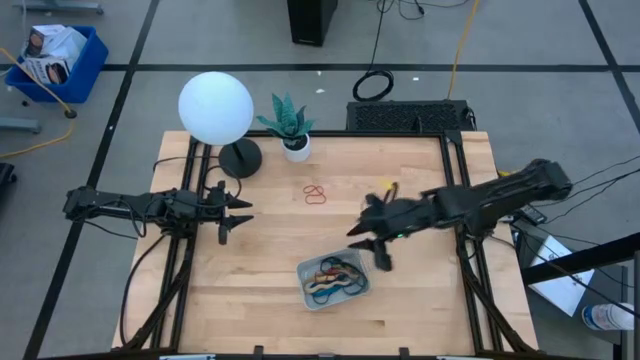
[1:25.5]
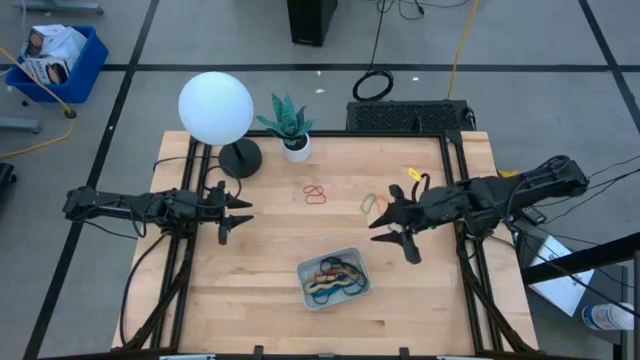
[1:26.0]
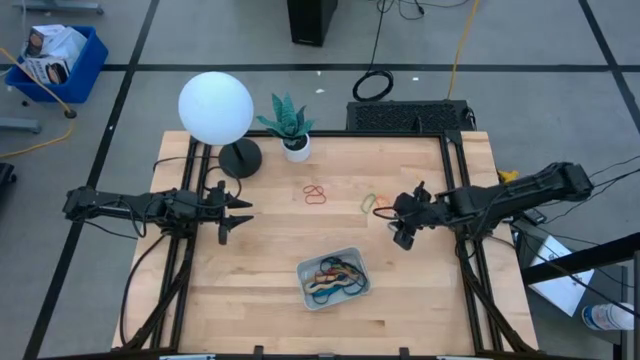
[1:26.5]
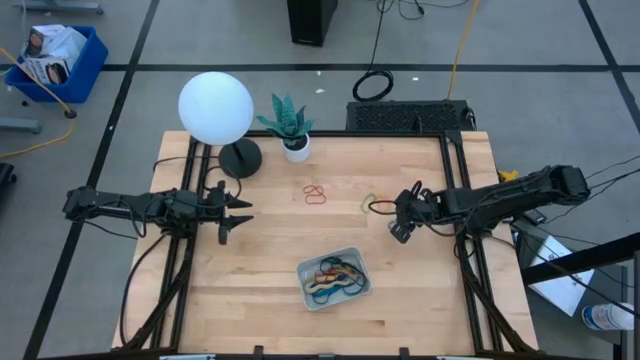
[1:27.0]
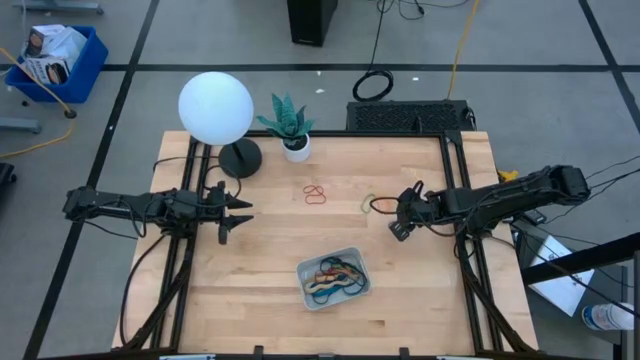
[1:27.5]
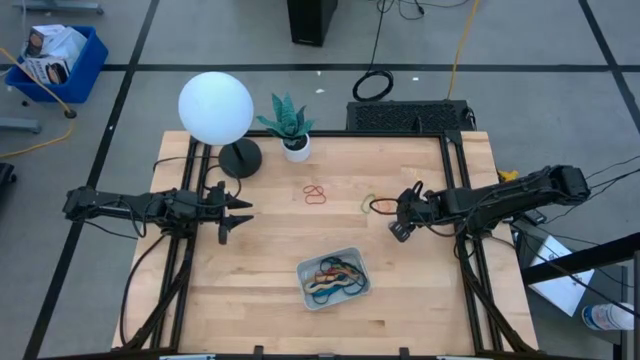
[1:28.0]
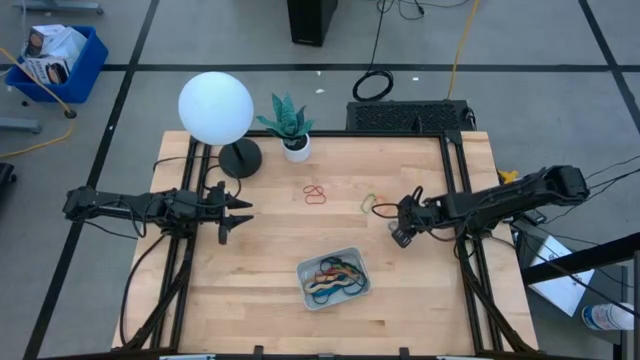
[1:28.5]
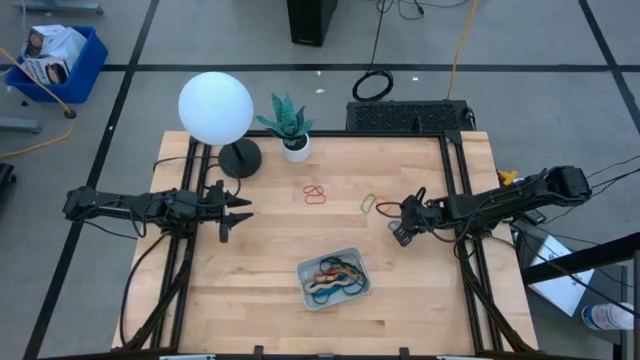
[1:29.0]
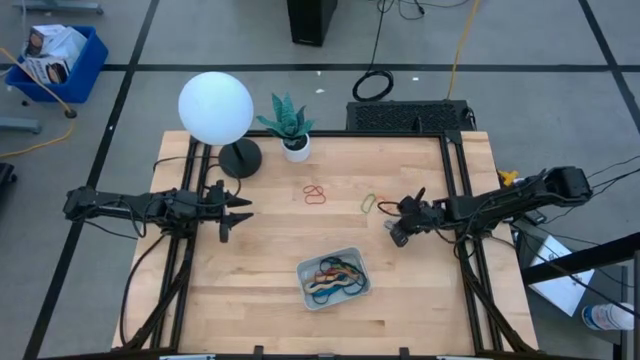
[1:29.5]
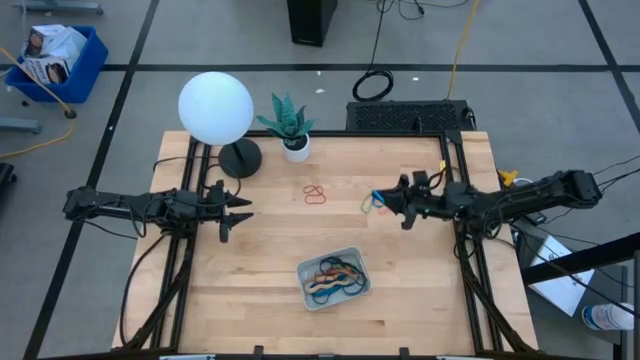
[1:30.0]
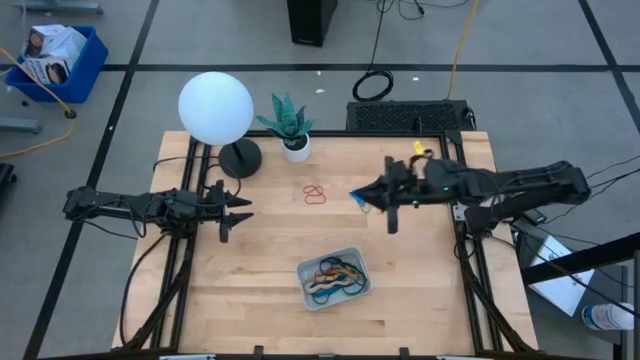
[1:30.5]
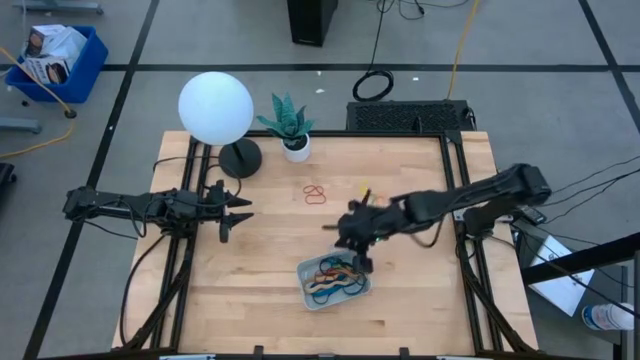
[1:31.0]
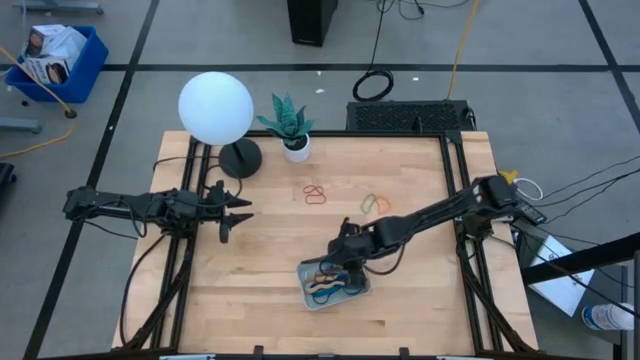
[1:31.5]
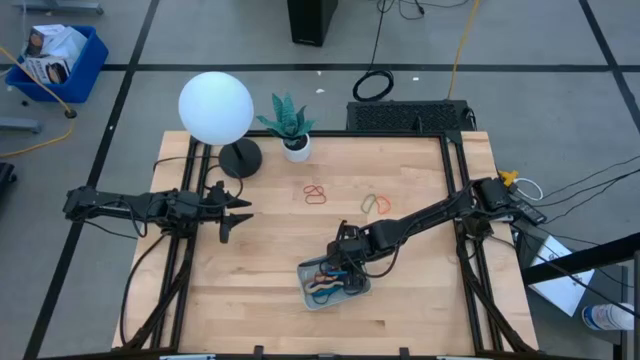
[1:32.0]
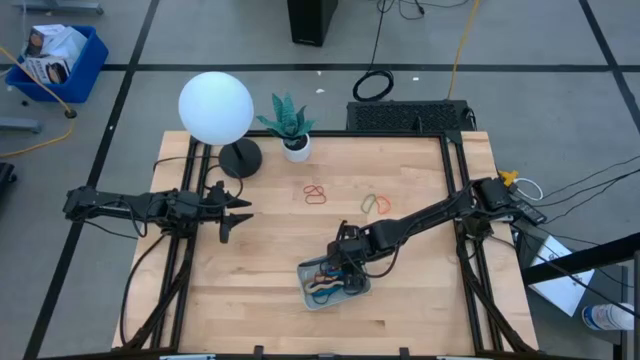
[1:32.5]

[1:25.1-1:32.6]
Task: Pick and place rubber bands into bin
Put the blue rubber band into the gray bin

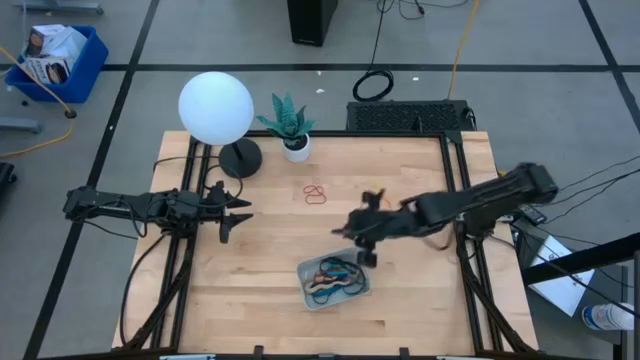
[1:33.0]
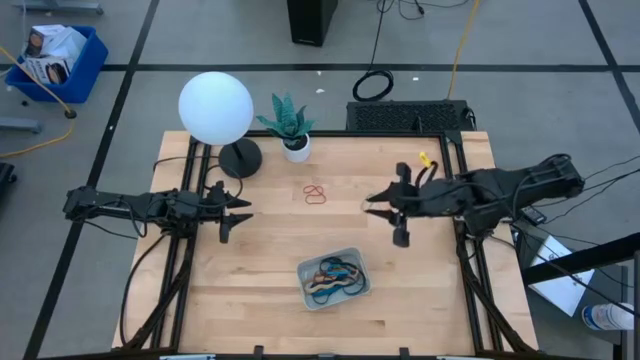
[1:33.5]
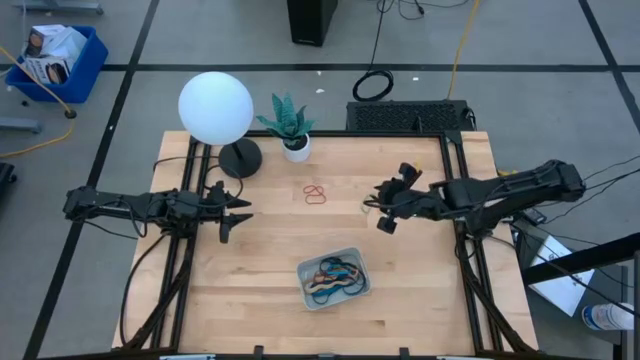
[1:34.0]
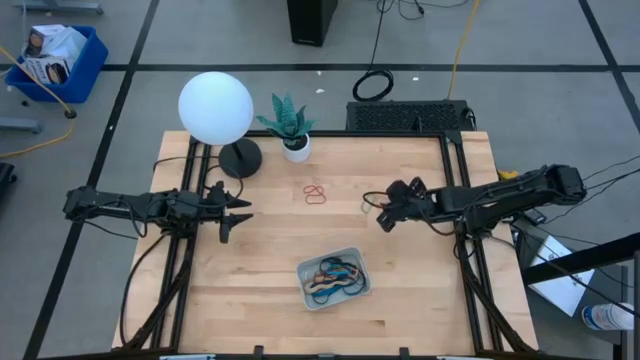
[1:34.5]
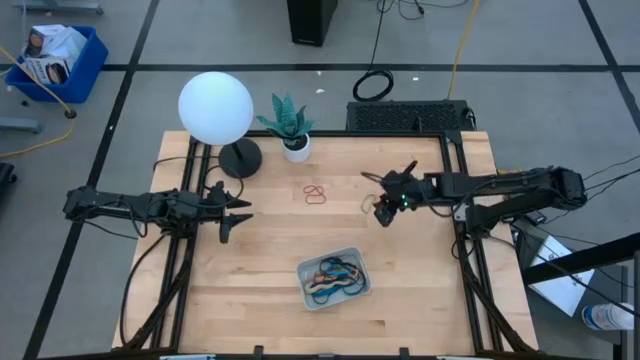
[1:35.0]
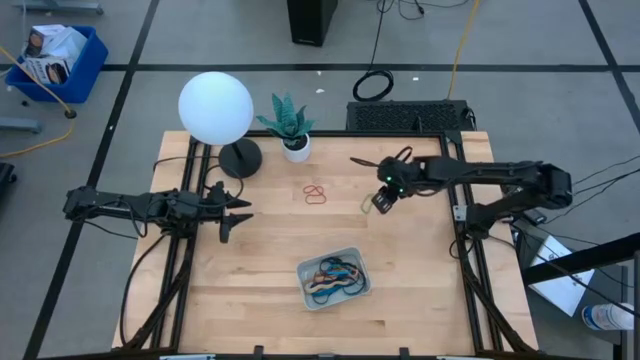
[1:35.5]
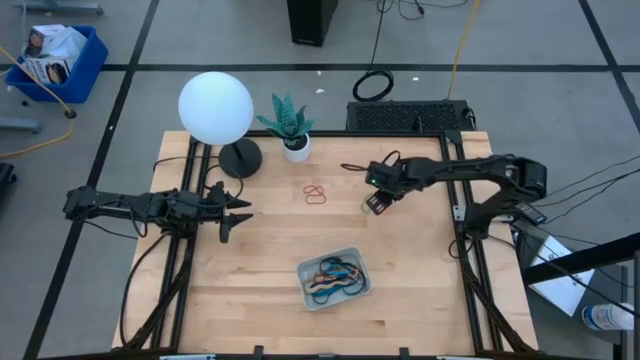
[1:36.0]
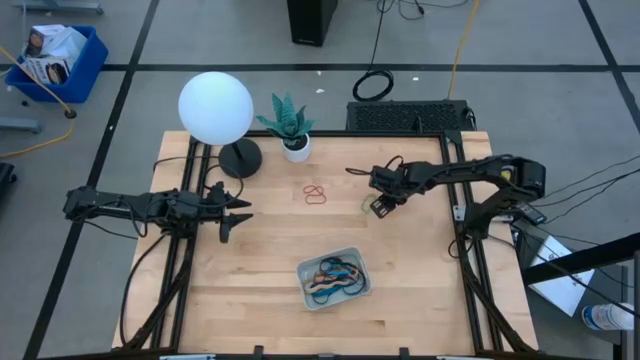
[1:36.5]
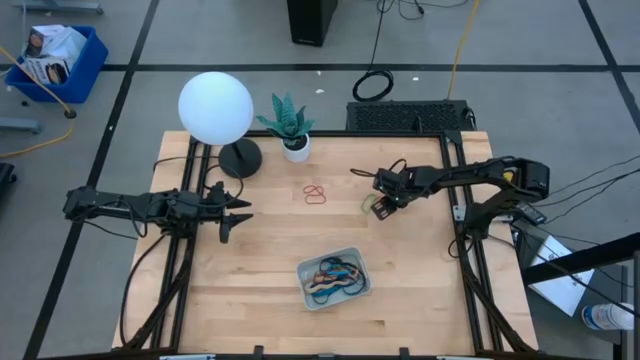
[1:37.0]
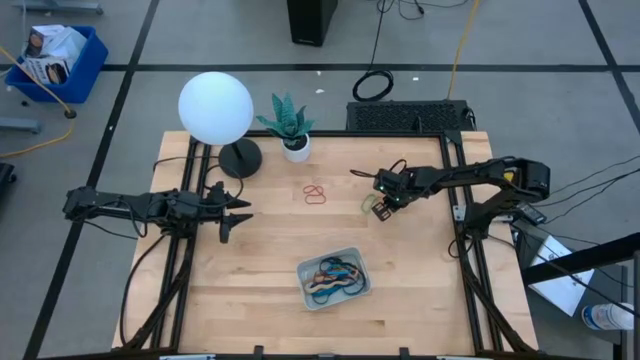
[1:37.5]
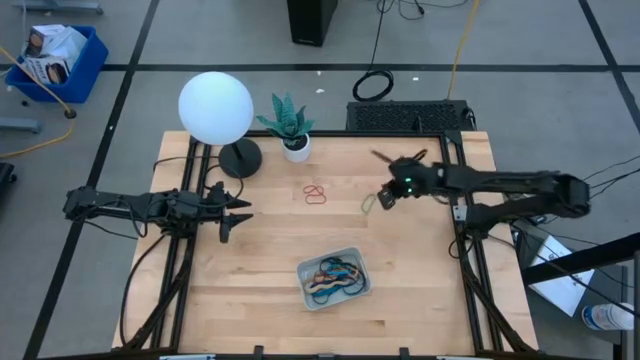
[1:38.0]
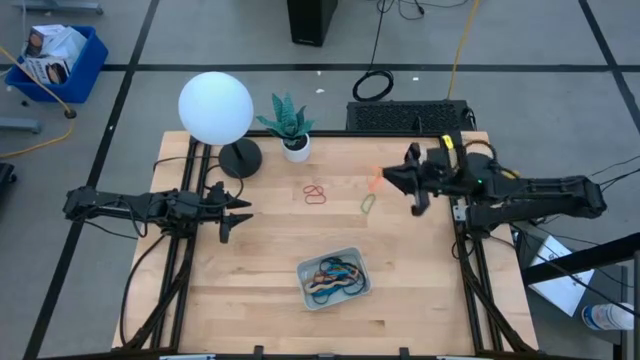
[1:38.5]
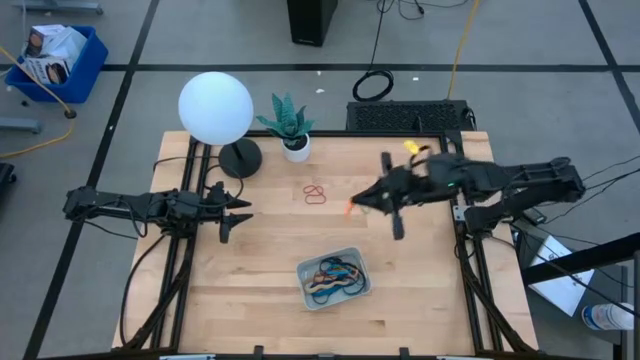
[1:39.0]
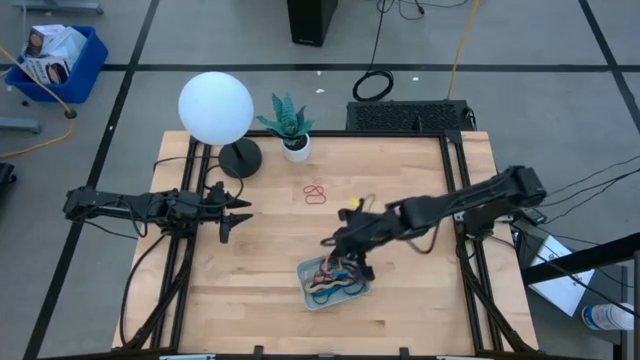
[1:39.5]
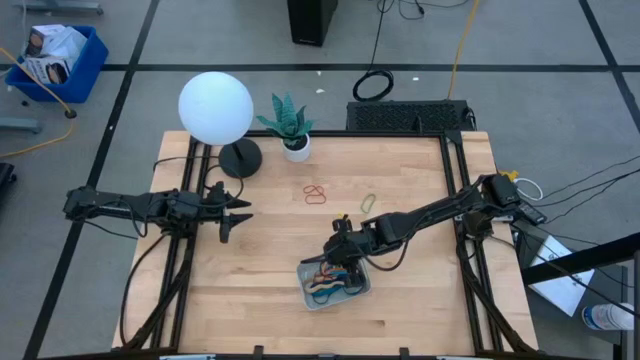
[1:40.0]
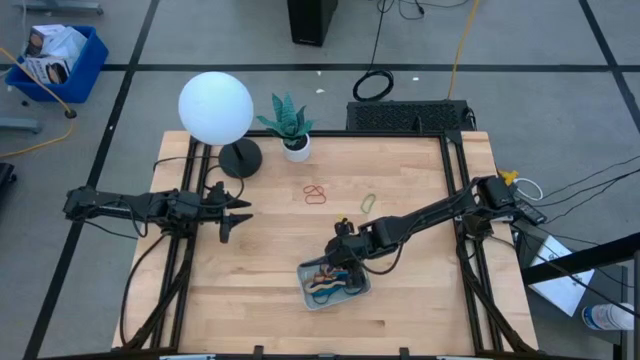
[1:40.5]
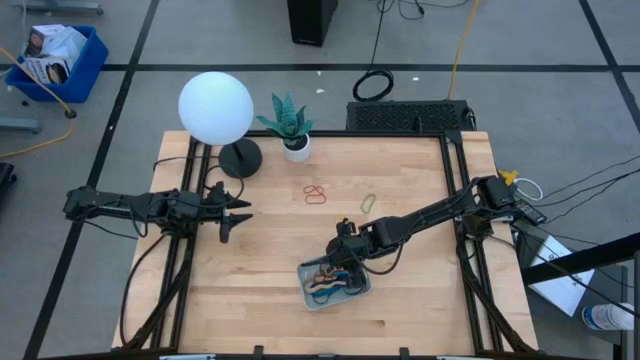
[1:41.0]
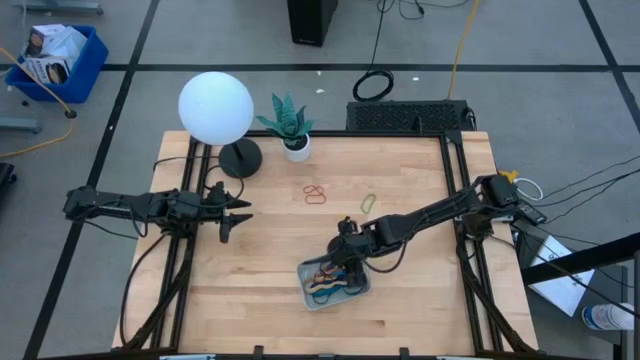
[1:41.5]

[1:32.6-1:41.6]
Put the orange rubber band into the gray bin

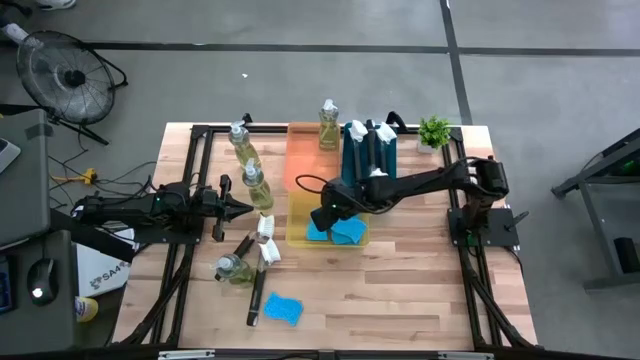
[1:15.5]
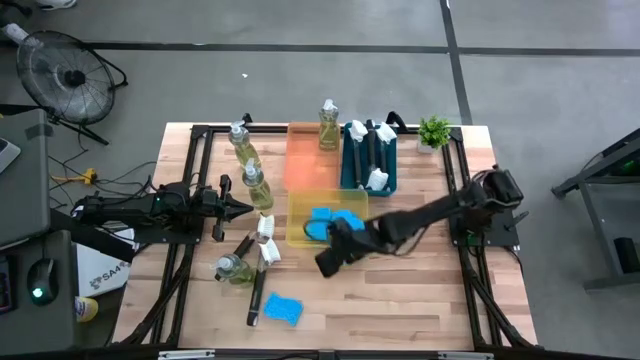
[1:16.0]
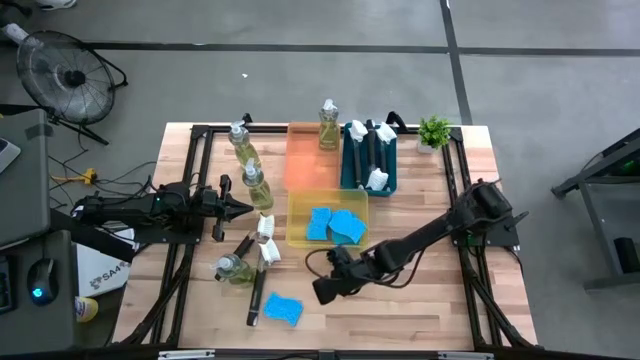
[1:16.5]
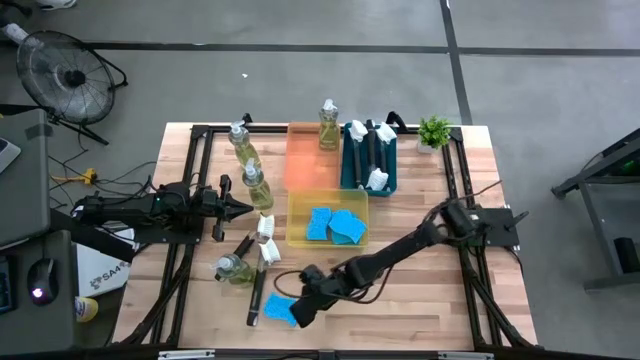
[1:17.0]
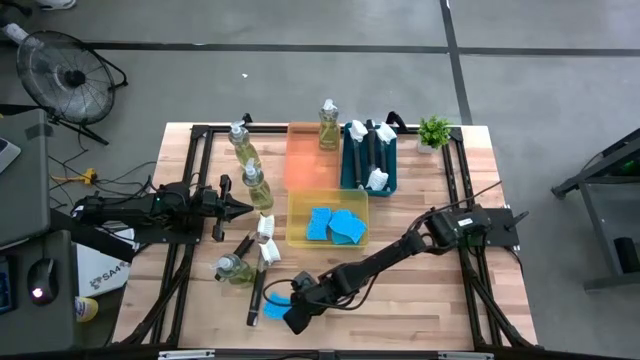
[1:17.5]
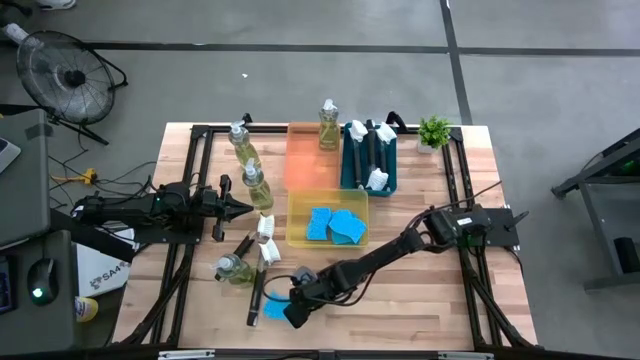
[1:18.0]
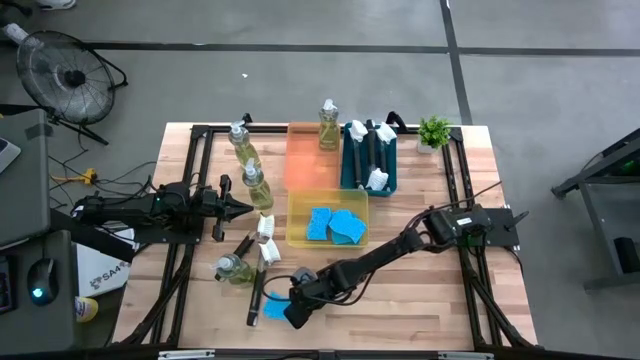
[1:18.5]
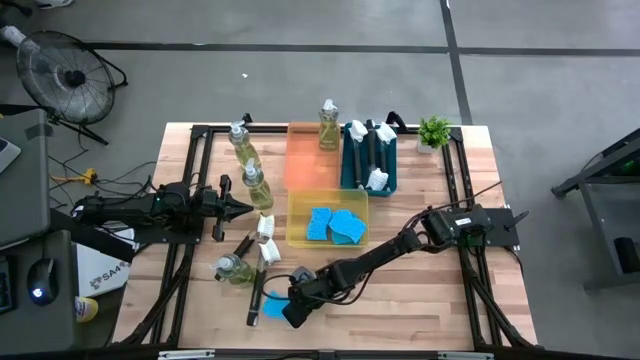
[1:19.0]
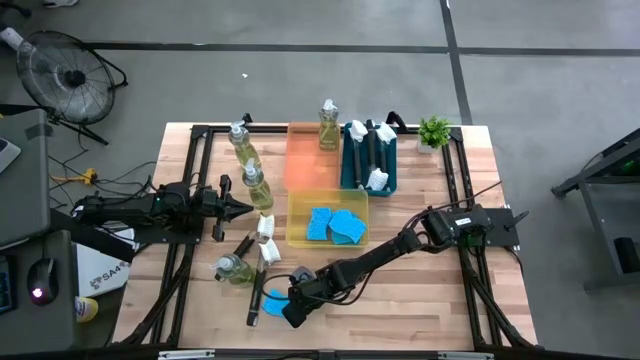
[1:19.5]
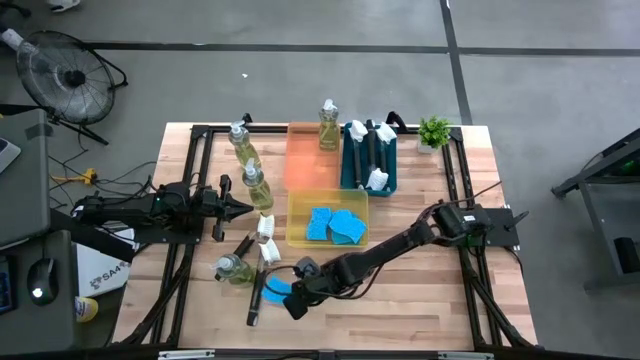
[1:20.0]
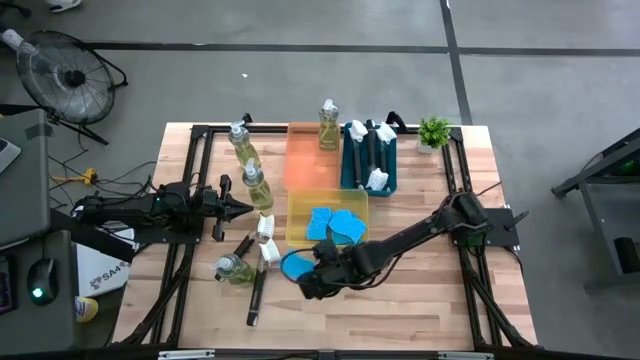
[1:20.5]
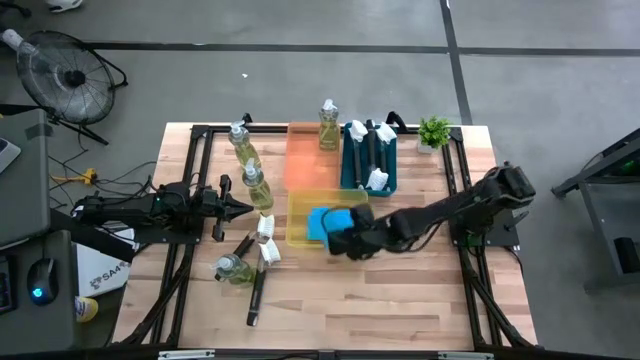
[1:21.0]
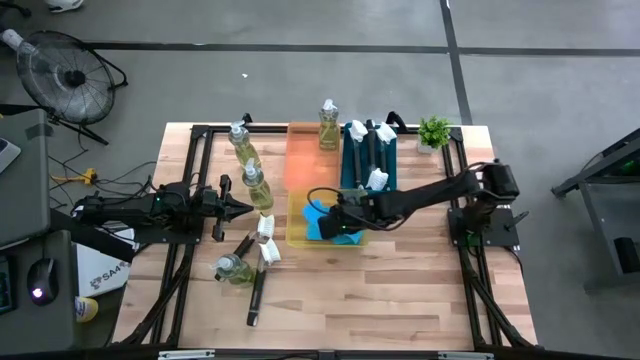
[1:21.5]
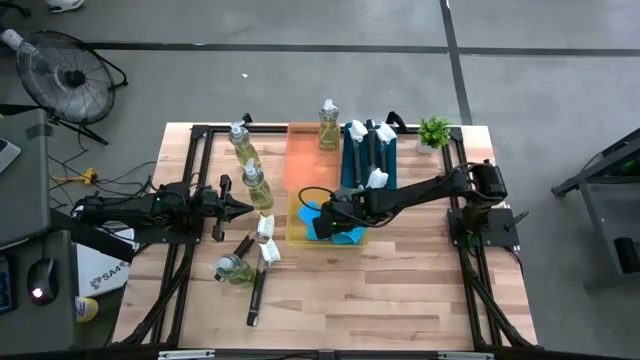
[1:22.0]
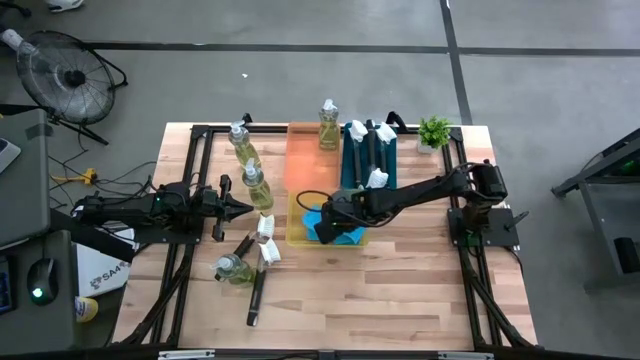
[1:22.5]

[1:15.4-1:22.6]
Task: Pick & Place Kitchen Sink Supplies
Stack the sponge on top of the sponge in the yellow bin
